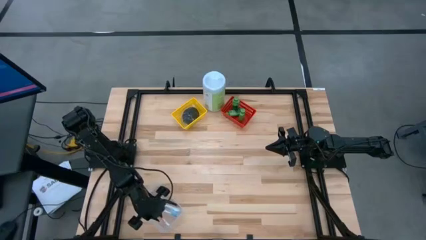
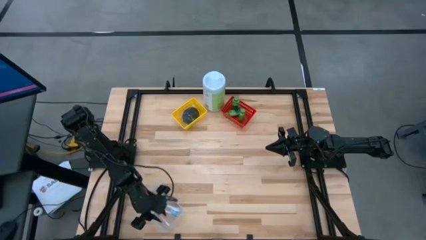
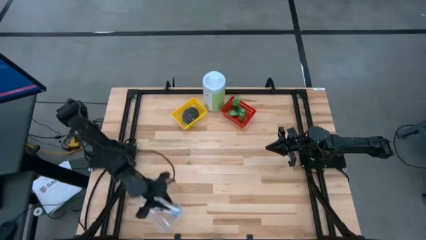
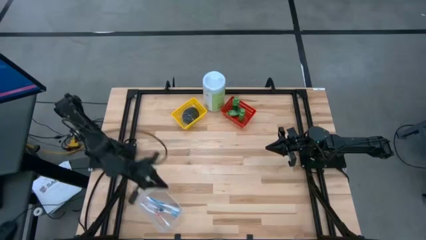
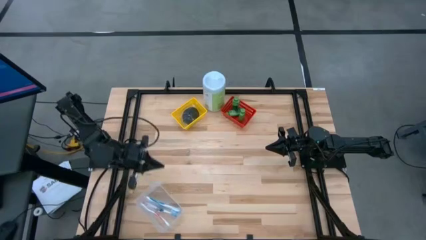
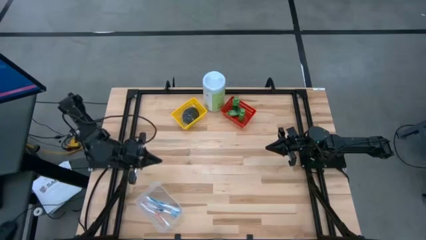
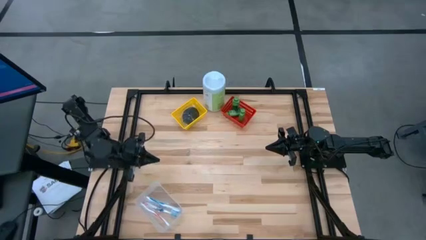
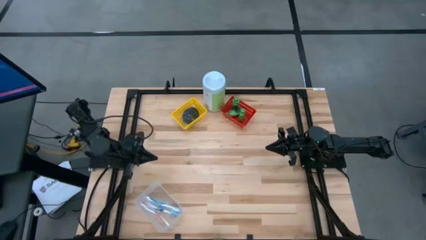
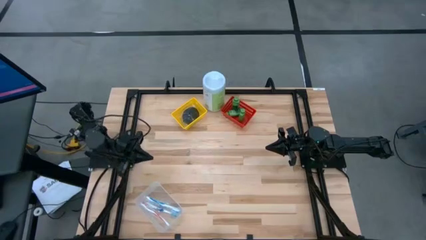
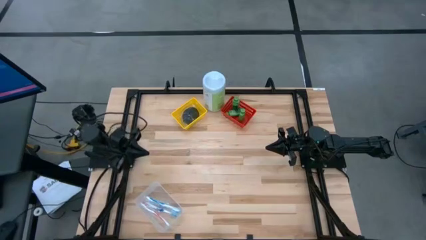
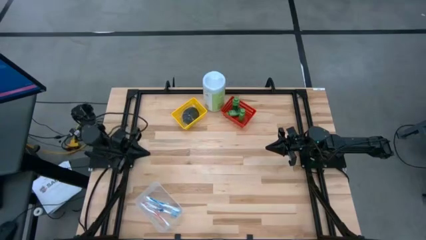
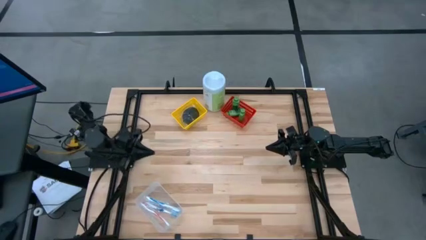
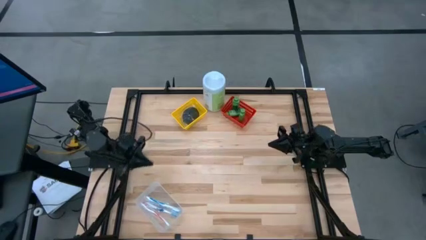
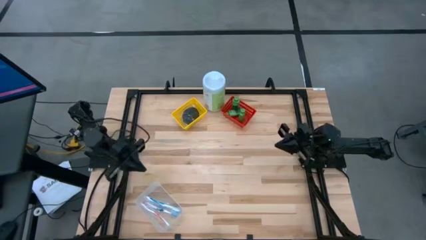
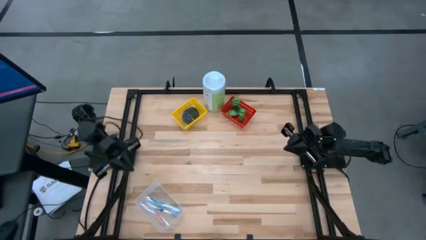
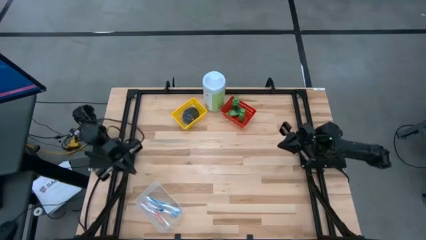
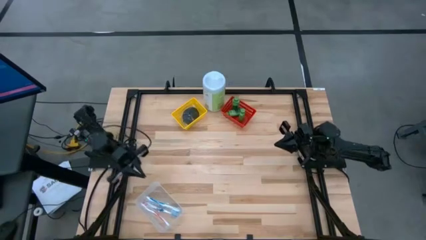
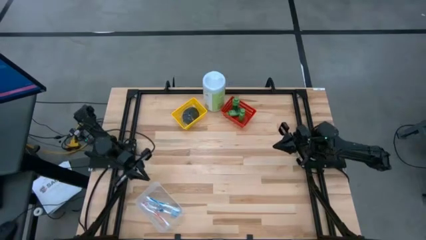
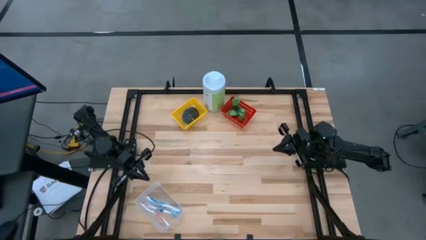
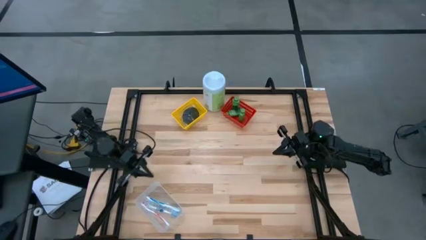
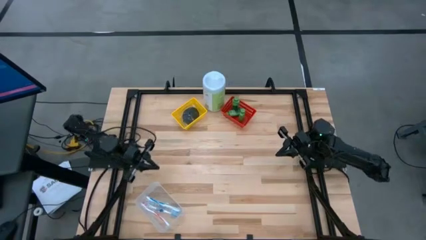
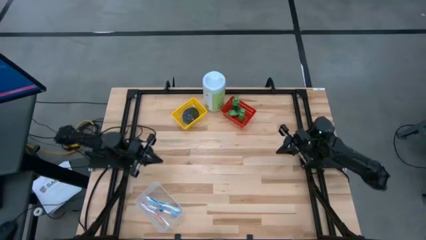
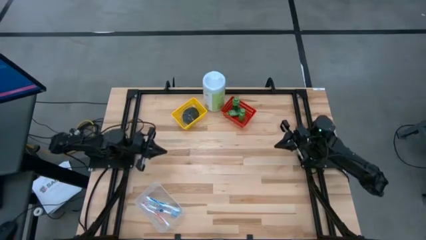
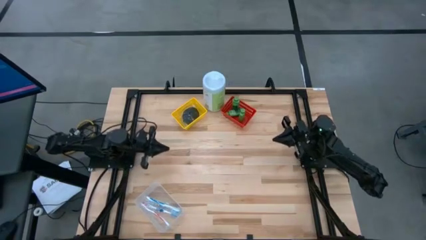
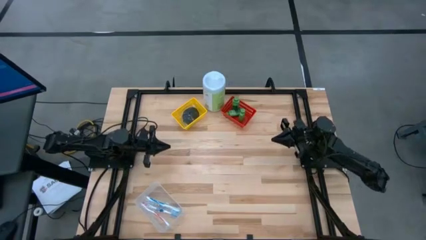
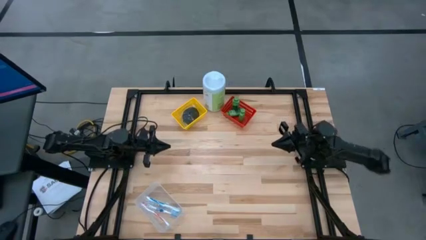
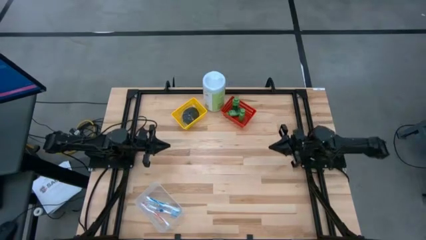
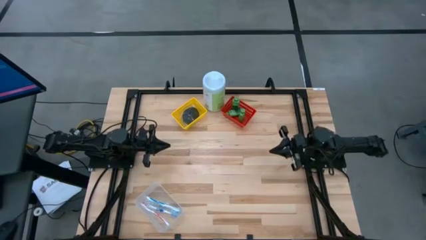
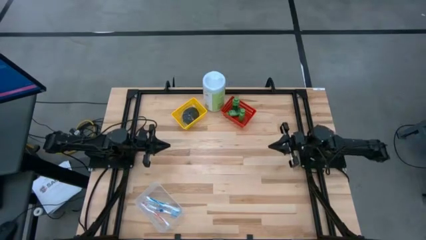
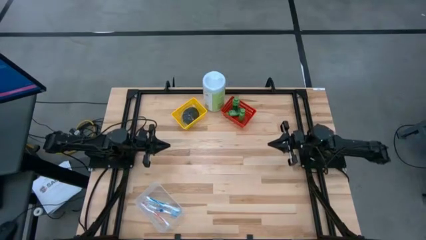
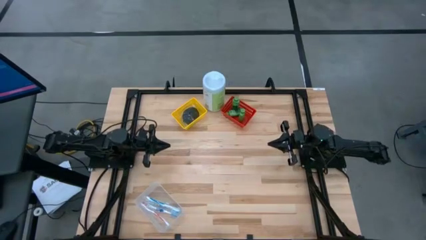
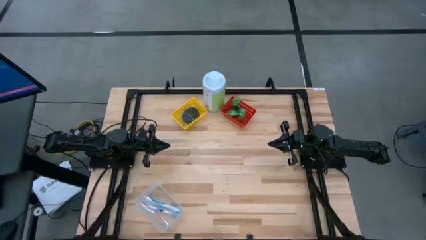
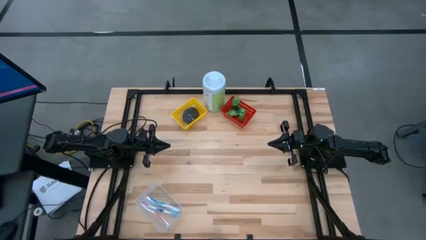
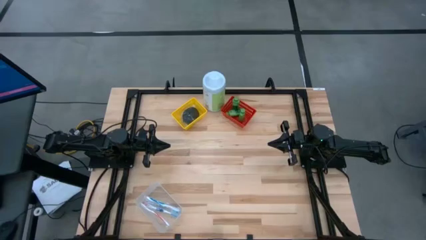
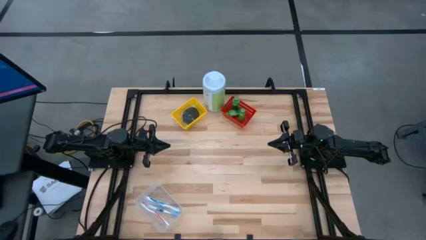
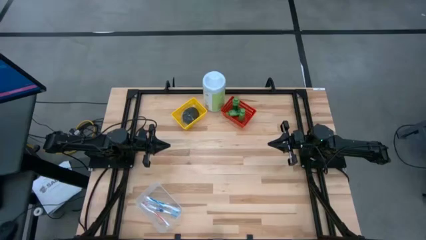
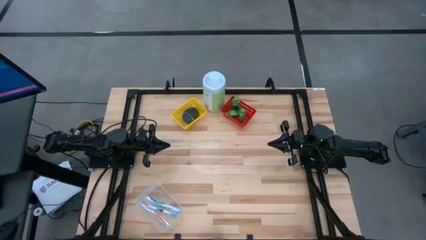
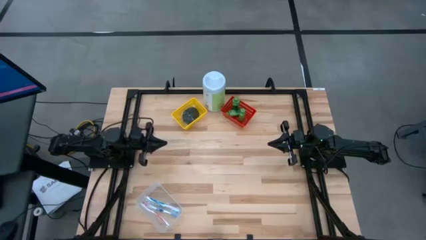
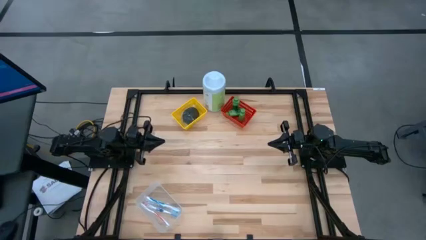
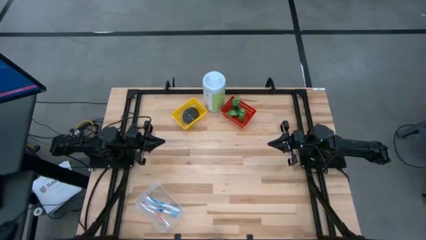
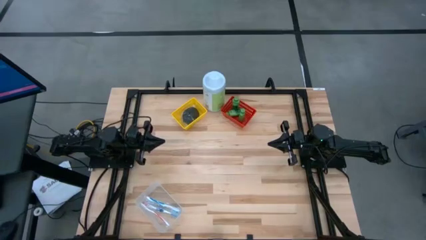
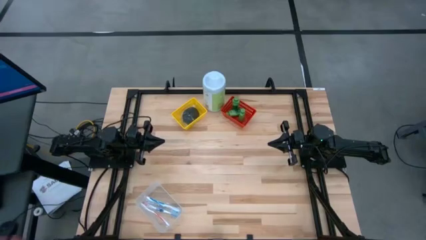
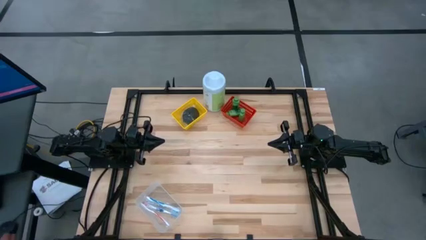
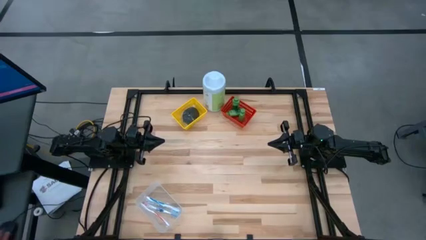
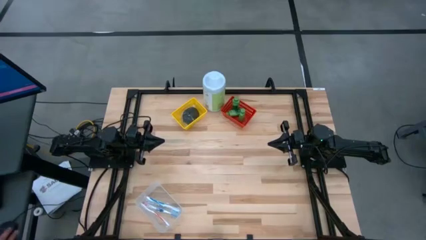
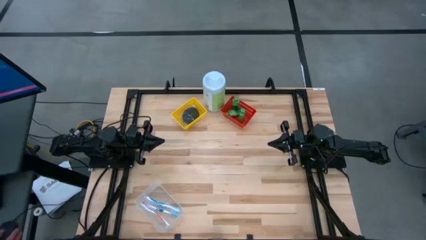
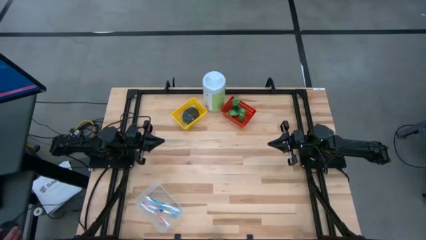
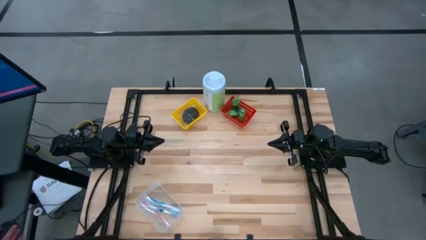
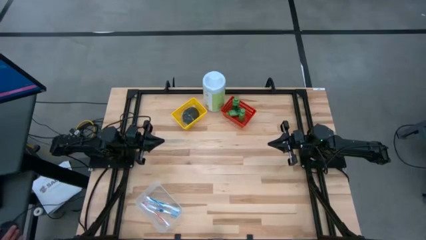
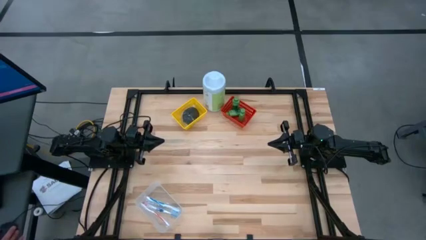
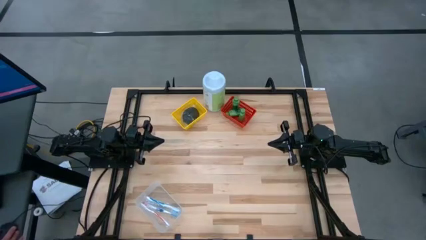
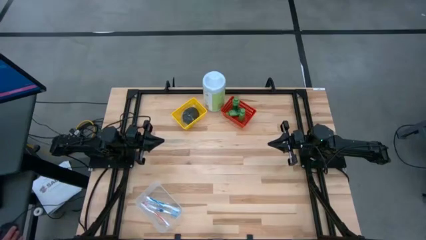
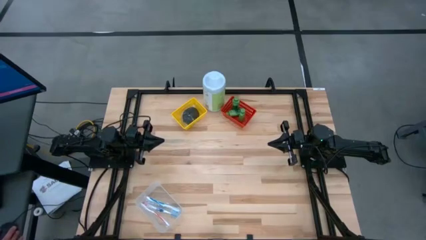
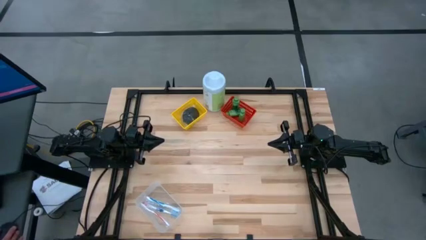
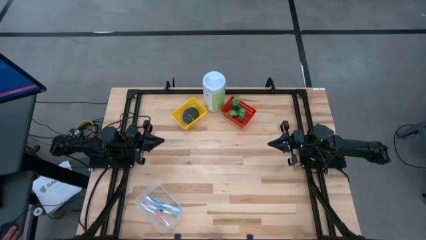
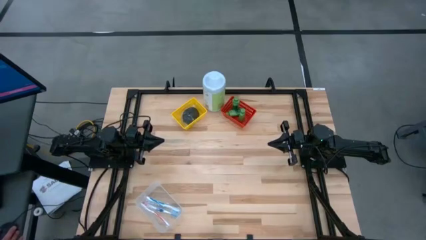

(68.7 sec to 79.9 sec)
Task: Pick & Place Travel size toiletries
Return to Home Position
